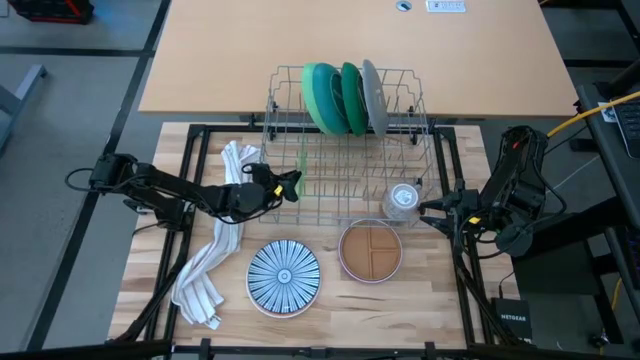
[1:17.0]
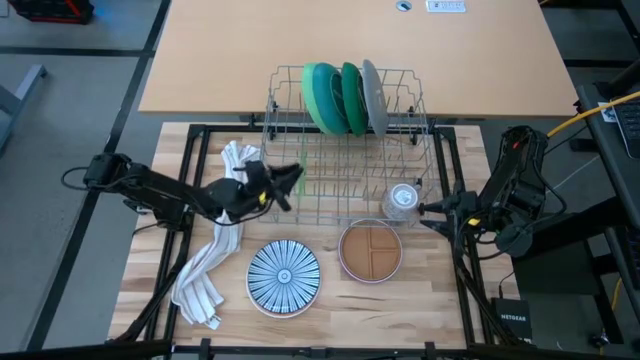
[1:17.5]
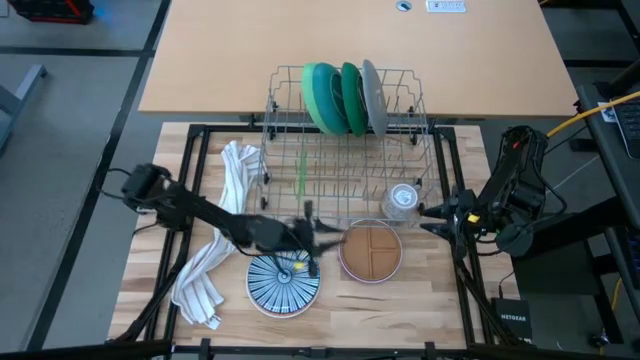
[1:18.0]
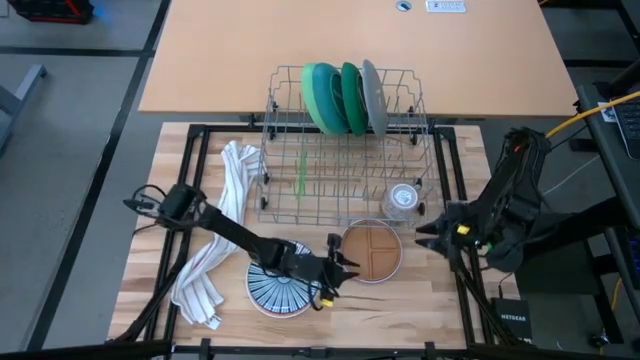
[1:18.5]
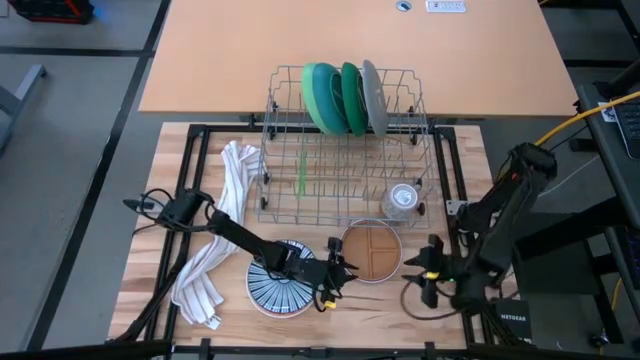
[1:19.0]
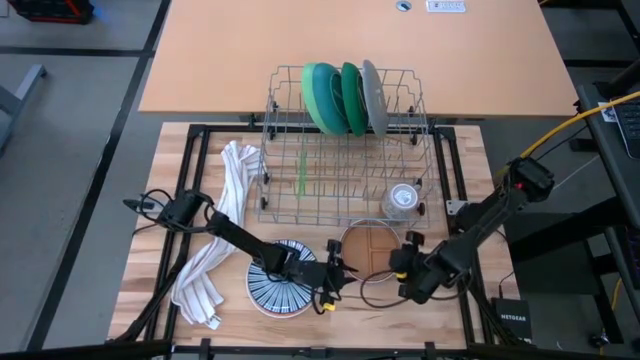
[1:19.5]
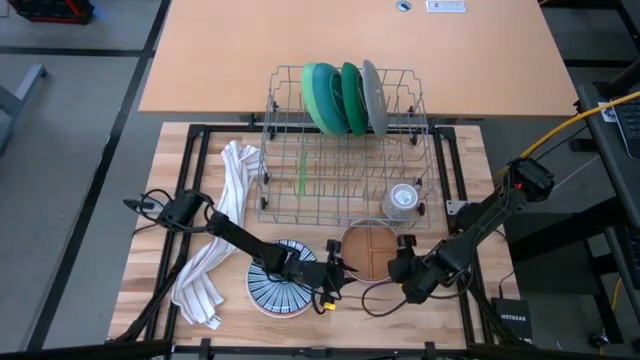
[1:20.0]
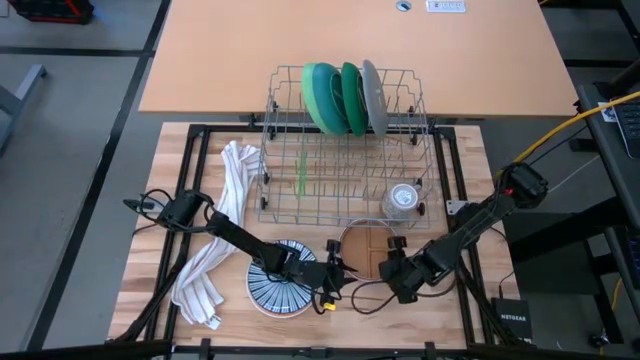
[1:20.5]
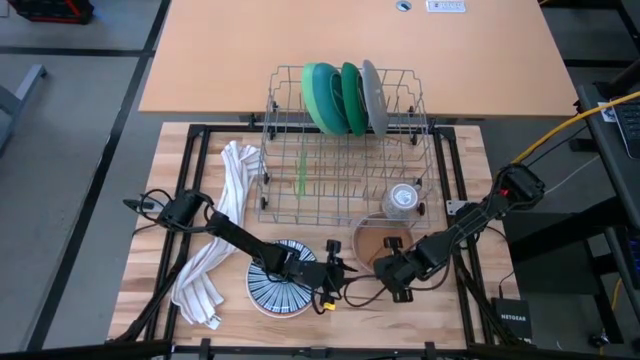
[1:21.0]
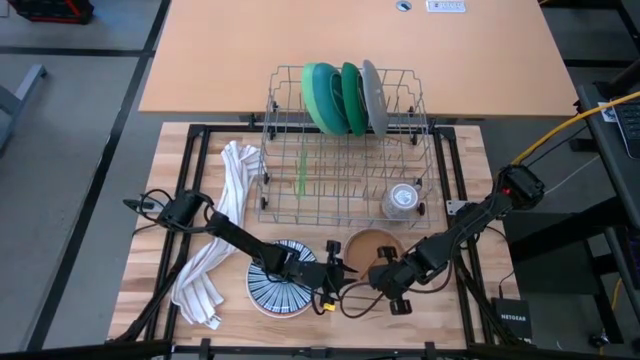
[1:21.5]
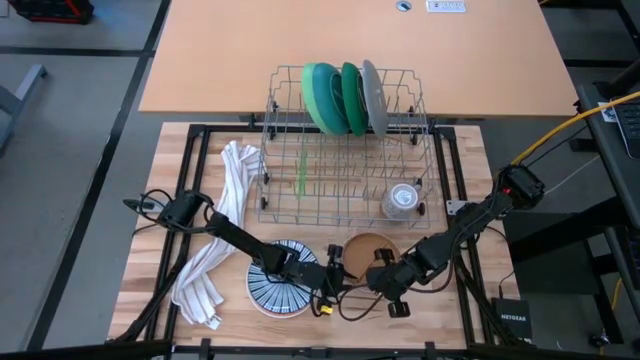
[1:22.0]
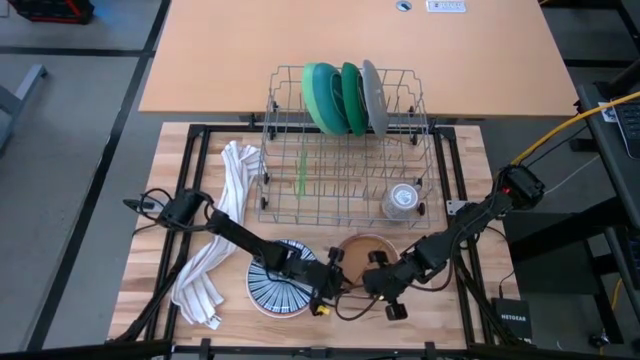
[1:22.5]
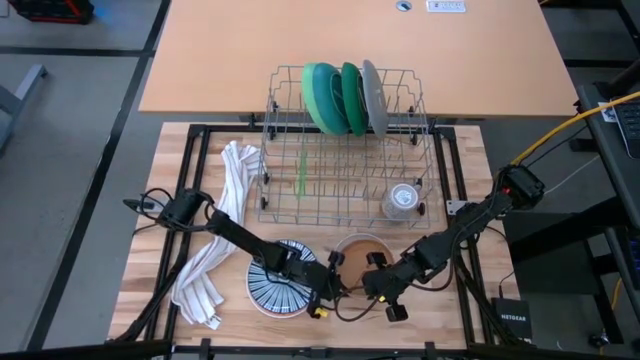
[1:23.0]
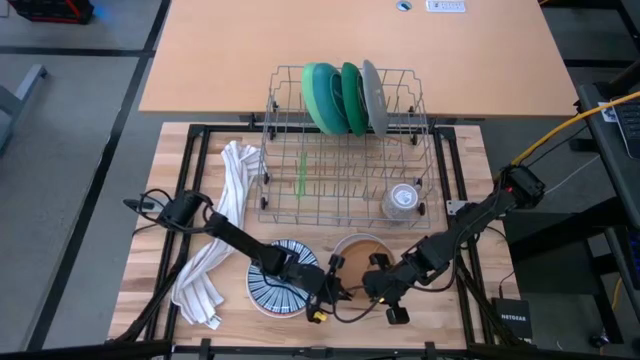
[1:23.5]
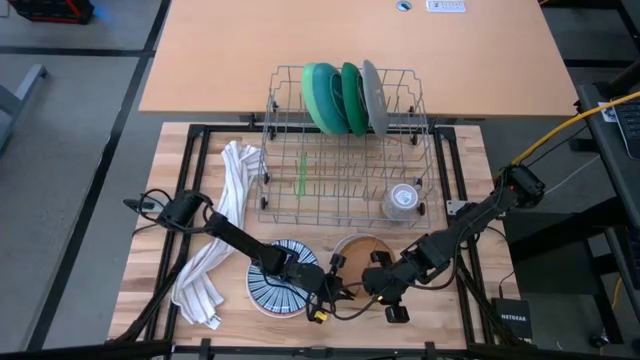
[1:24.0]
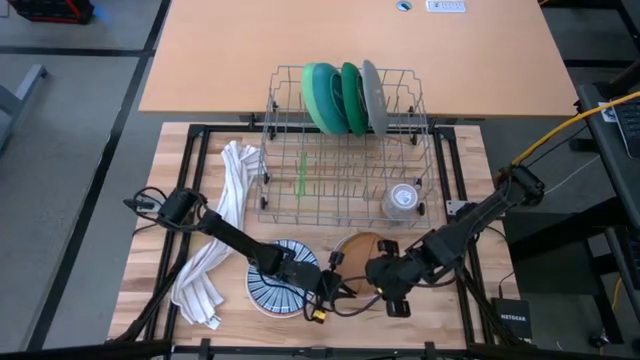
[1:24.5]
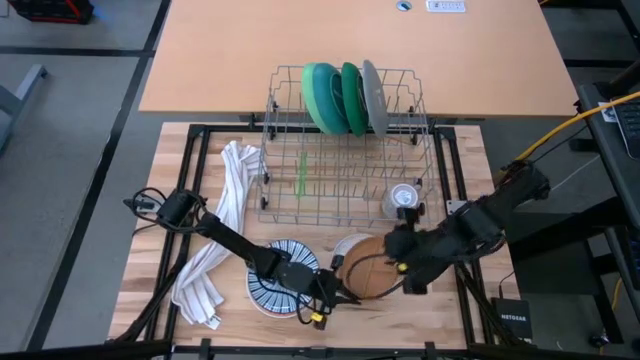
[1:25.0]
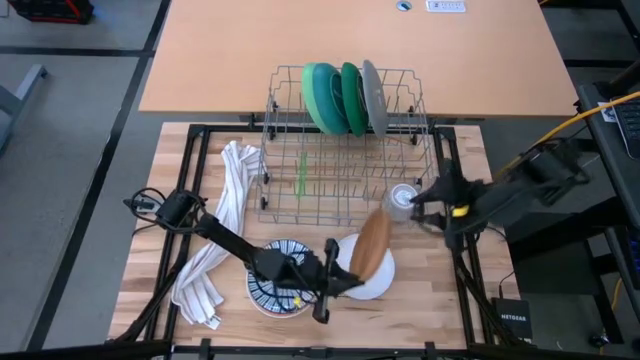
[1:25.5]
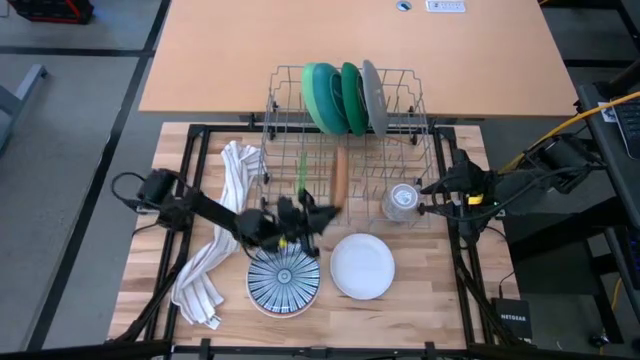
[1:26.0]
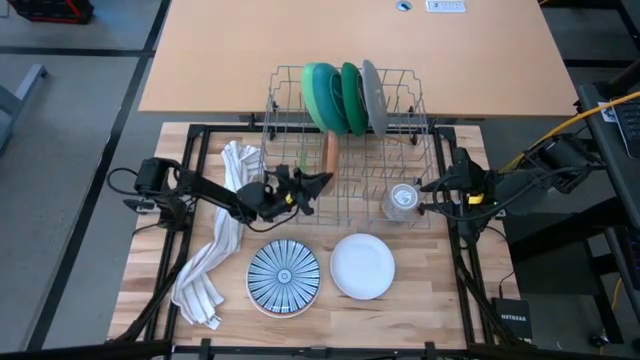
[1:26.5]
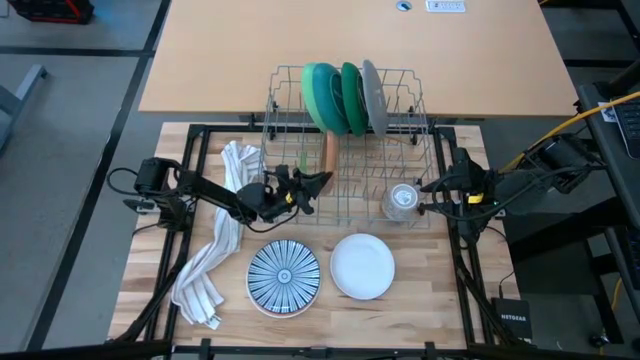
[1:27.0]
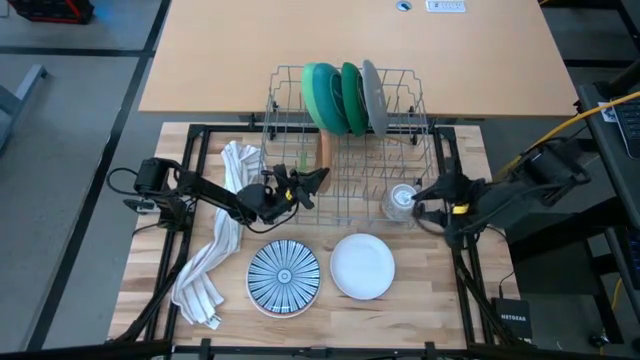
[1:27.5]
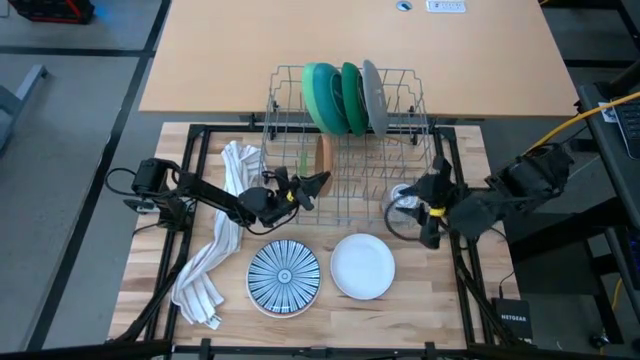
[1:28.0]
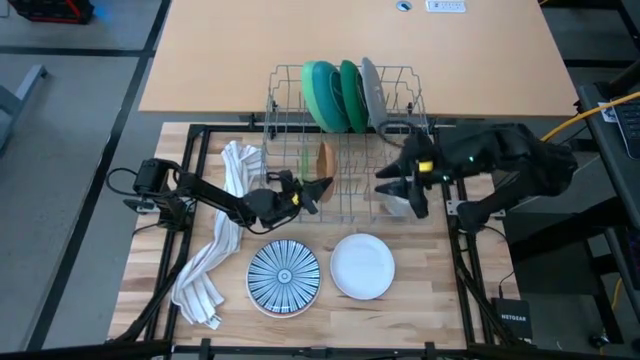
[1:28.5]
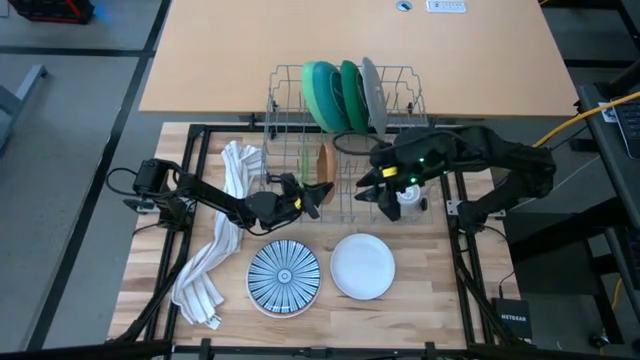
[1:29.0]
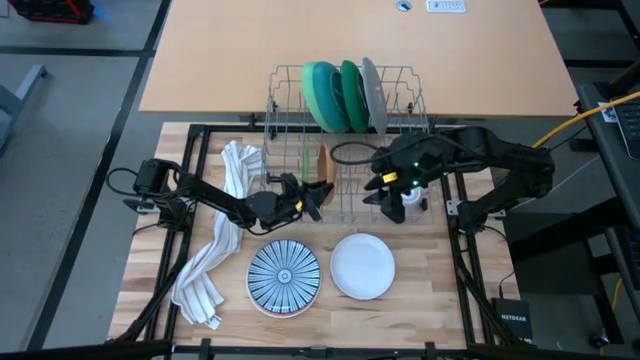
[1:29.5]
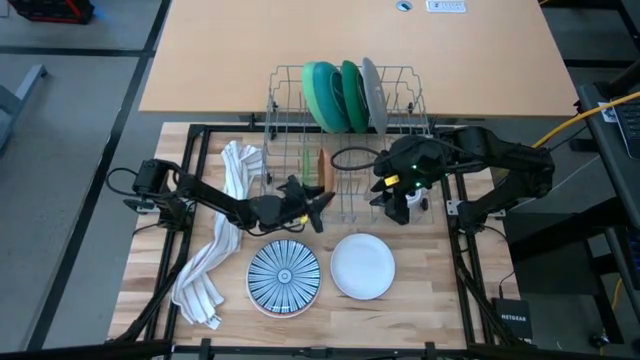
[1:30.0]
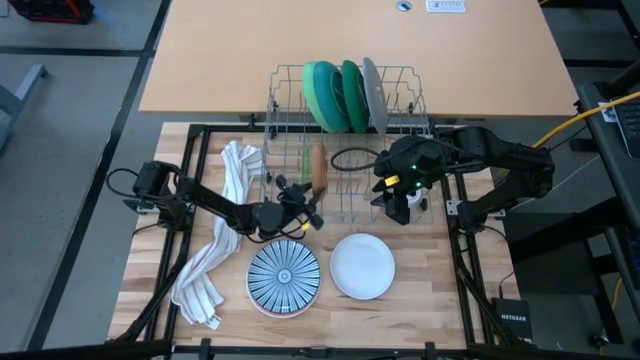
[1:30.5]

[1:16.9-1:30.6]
Task: Sort dishes
Put the brown plate into the dish rack

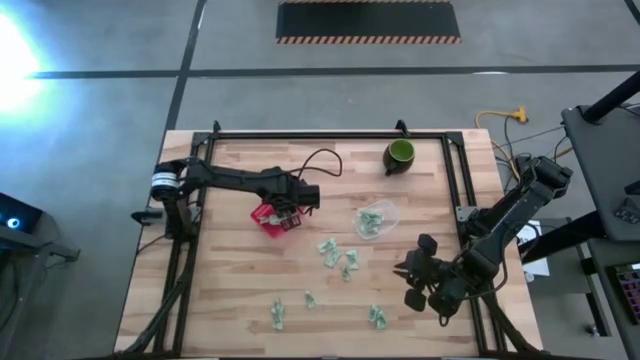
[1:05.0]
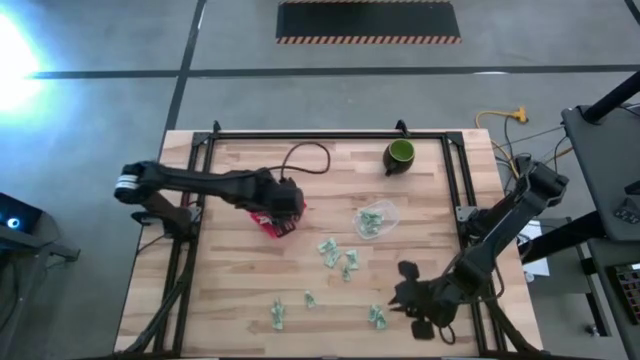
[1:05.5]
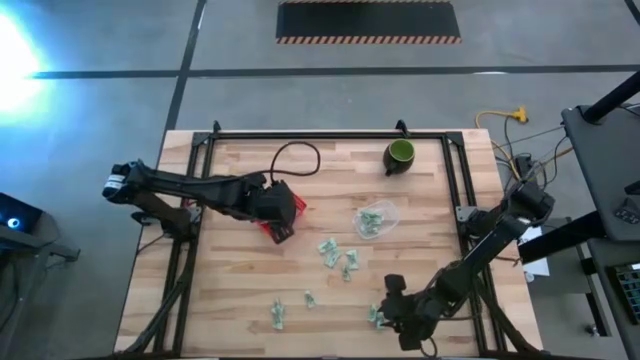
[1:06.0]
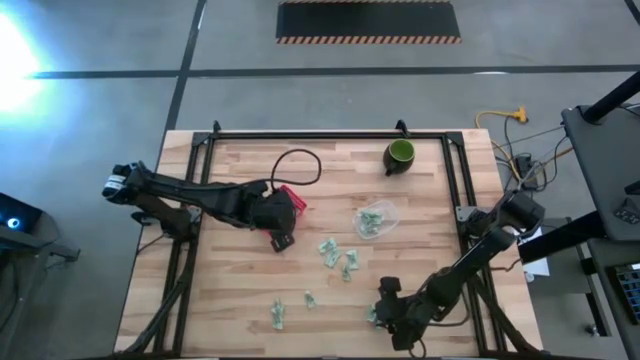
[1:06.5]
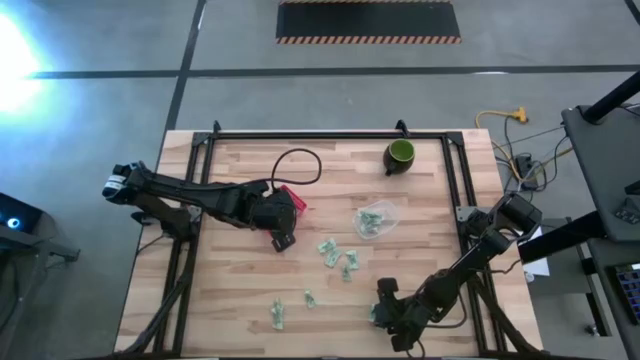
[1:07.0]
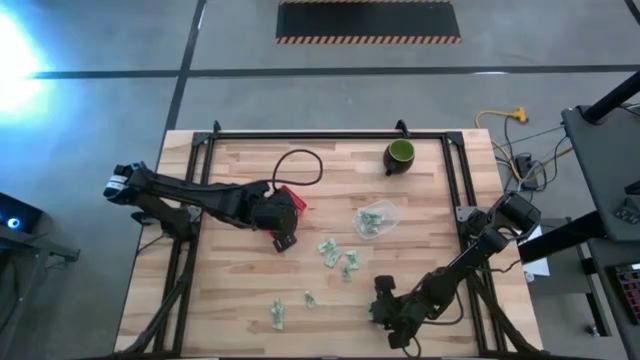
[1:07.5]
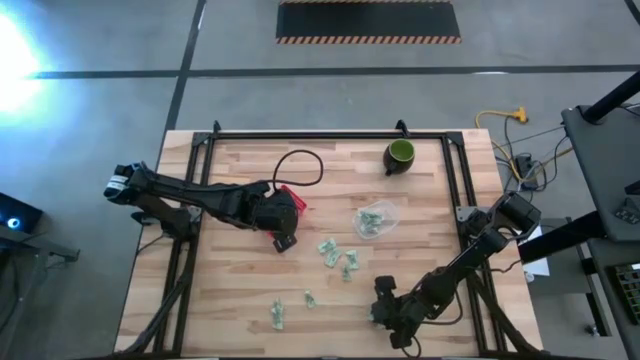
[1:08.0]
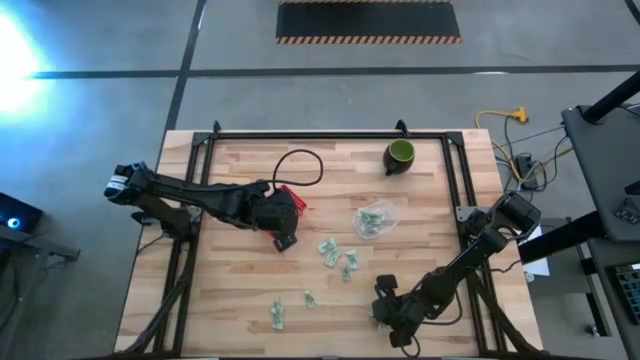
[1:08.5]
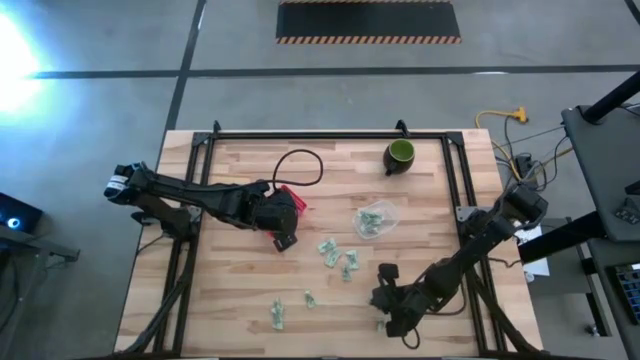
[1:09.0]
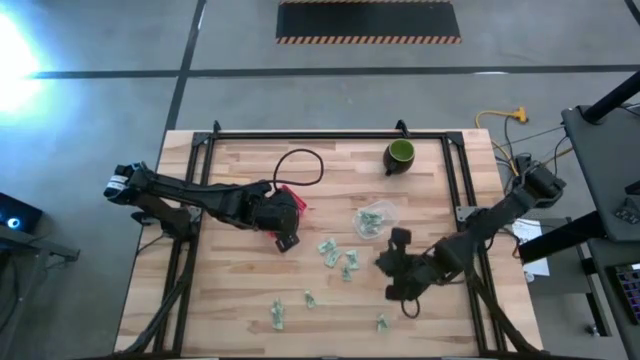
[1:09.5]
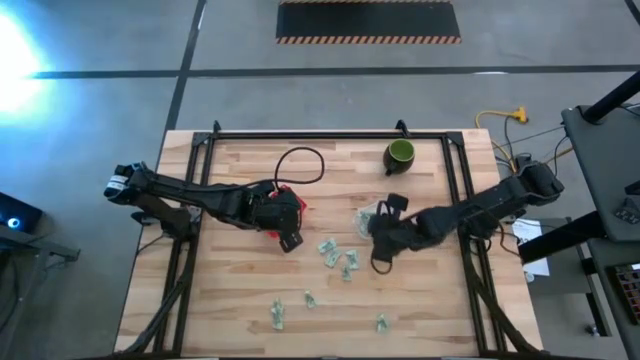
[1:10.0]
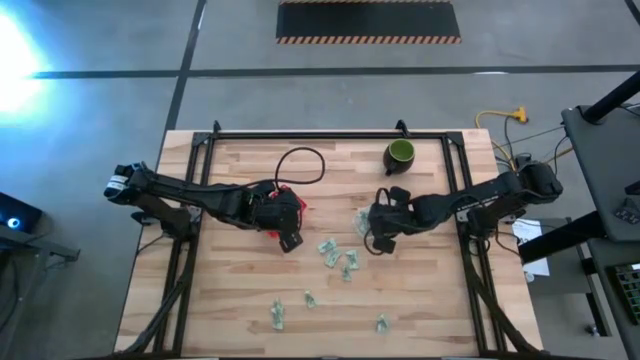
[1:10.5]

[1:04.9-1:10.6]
Task: Pick and place items into bin
Put the stevia packet into the transparent bin
